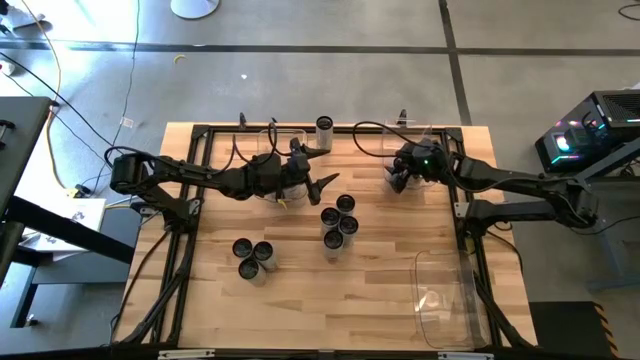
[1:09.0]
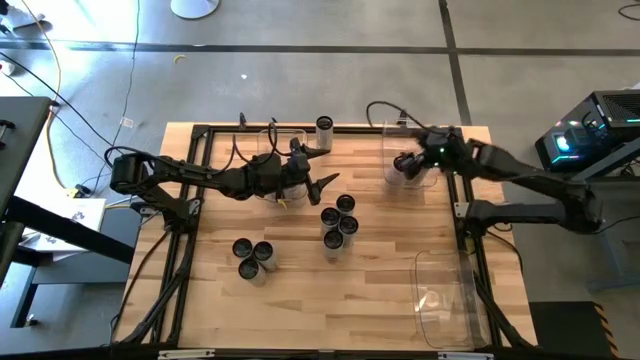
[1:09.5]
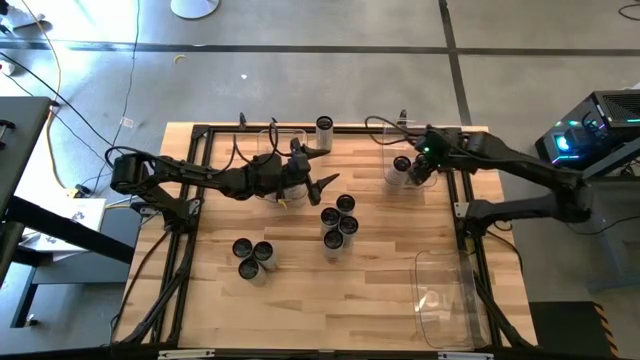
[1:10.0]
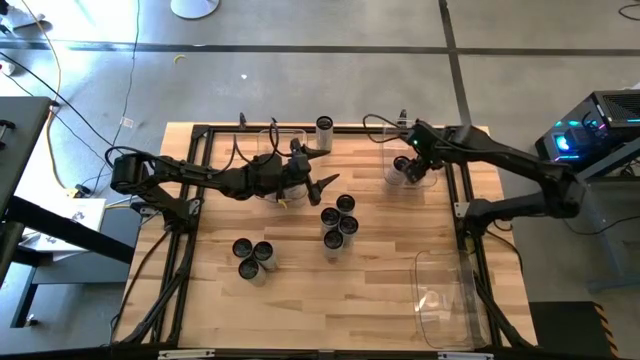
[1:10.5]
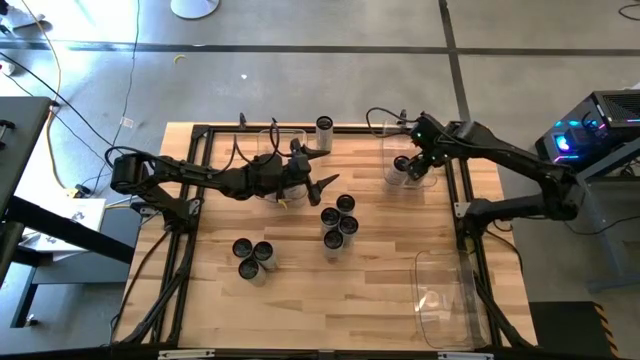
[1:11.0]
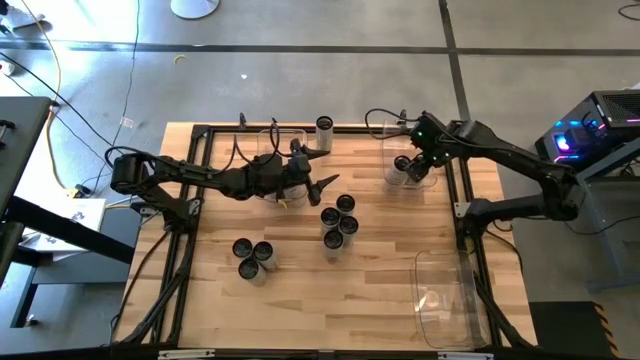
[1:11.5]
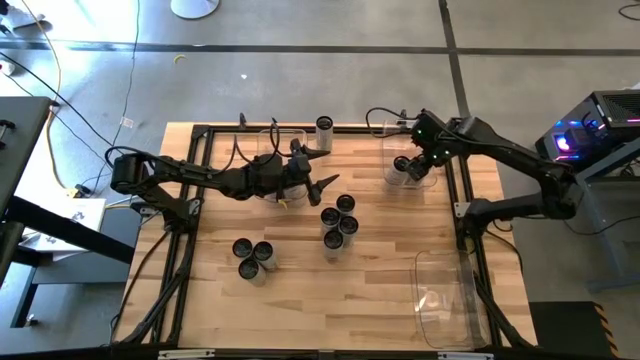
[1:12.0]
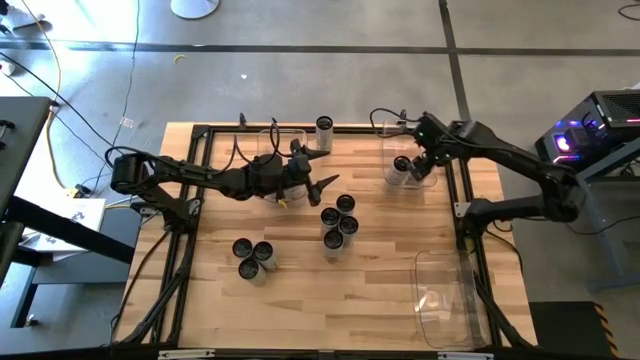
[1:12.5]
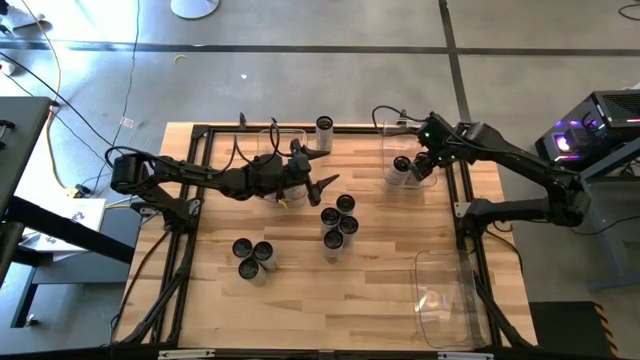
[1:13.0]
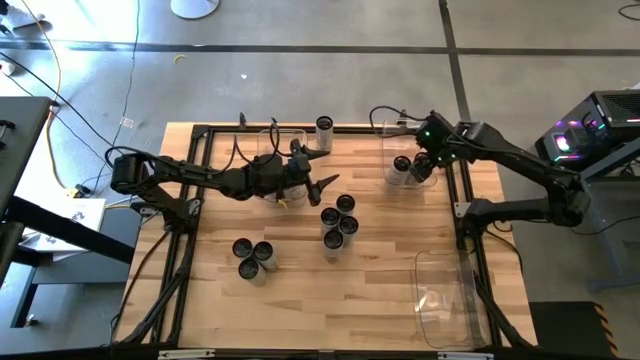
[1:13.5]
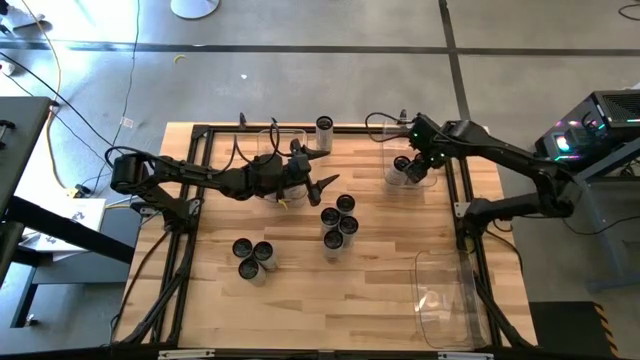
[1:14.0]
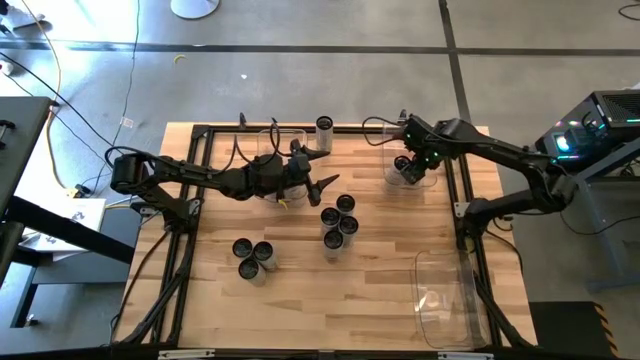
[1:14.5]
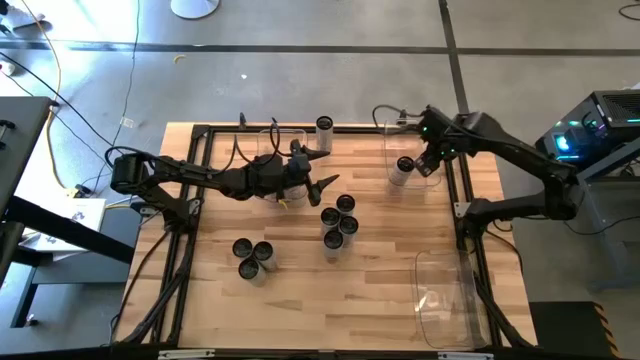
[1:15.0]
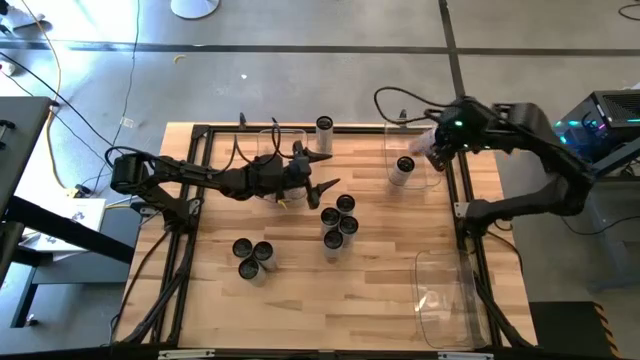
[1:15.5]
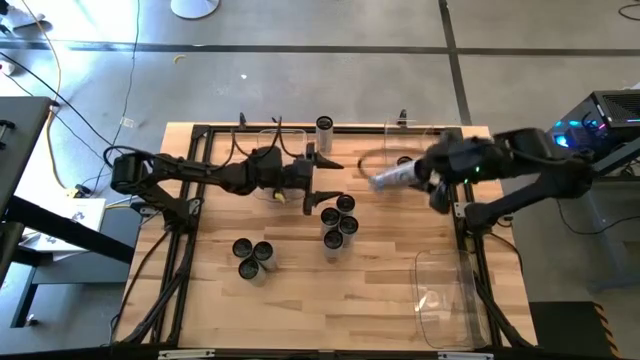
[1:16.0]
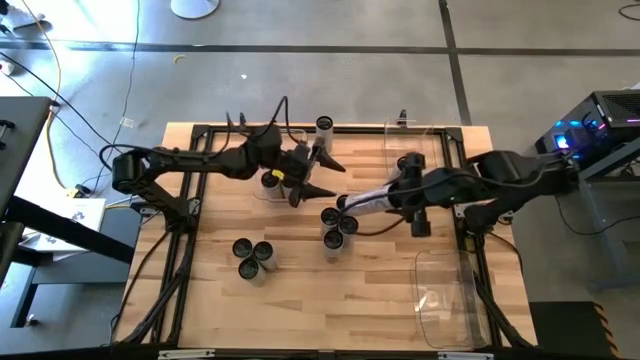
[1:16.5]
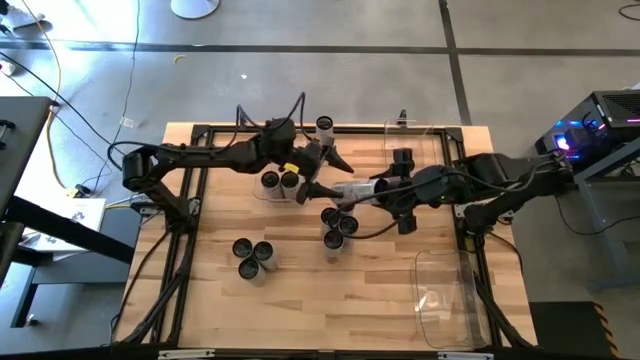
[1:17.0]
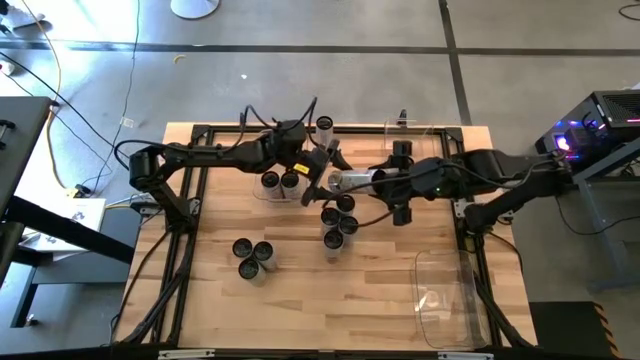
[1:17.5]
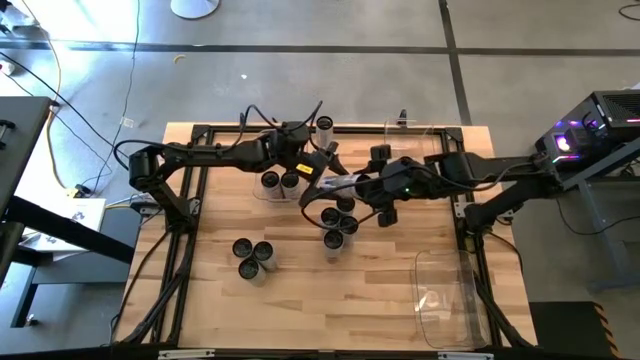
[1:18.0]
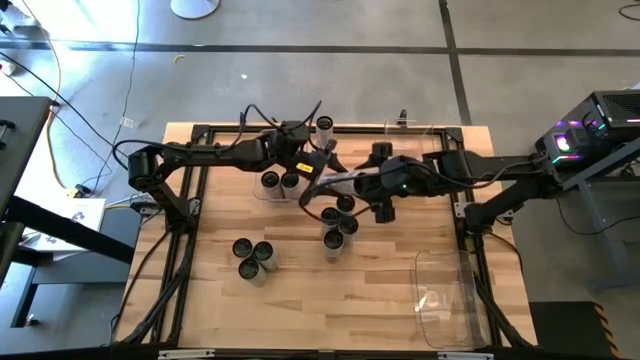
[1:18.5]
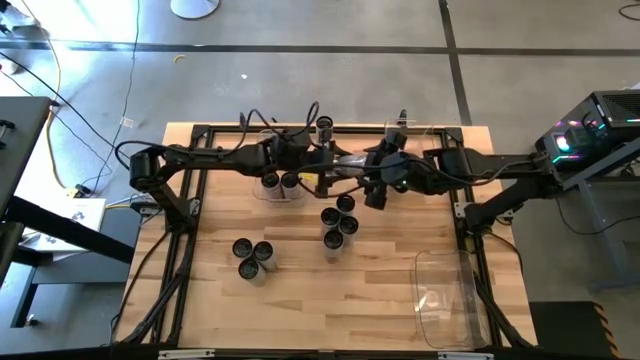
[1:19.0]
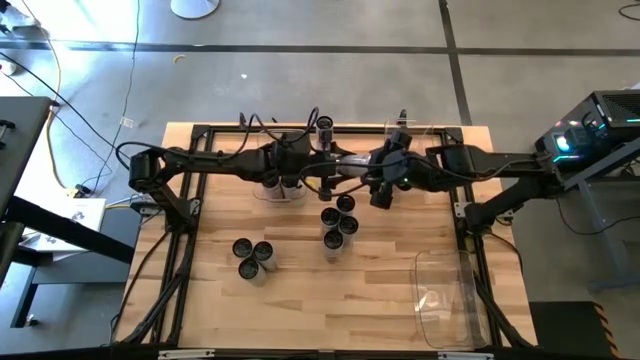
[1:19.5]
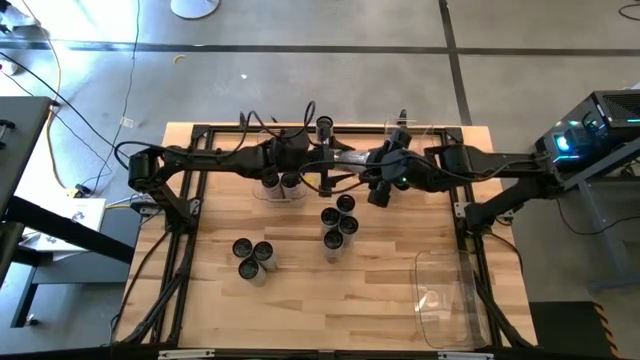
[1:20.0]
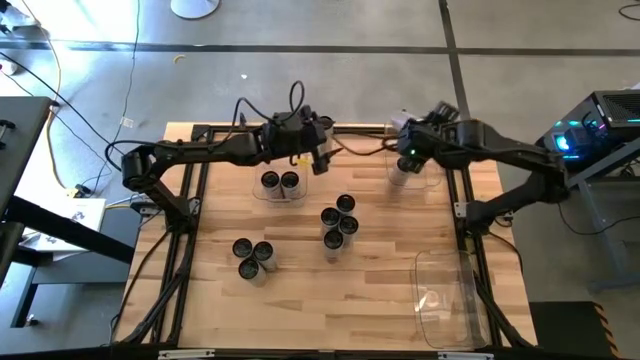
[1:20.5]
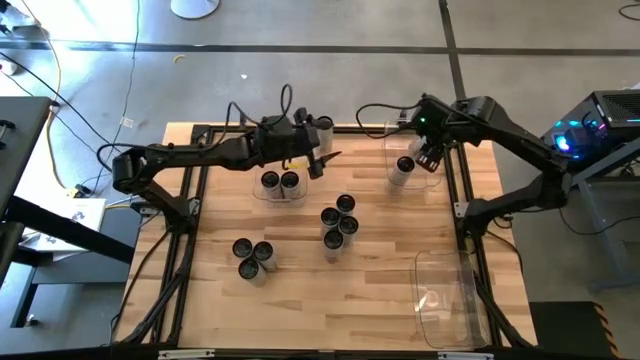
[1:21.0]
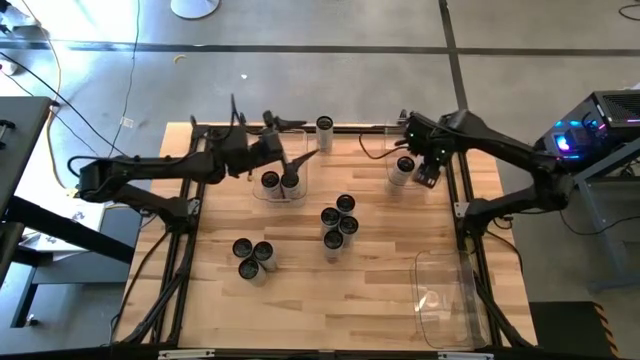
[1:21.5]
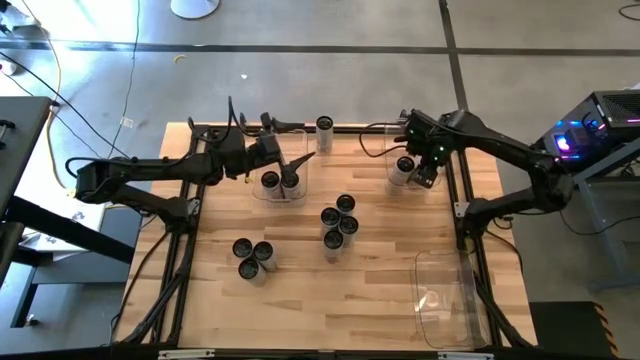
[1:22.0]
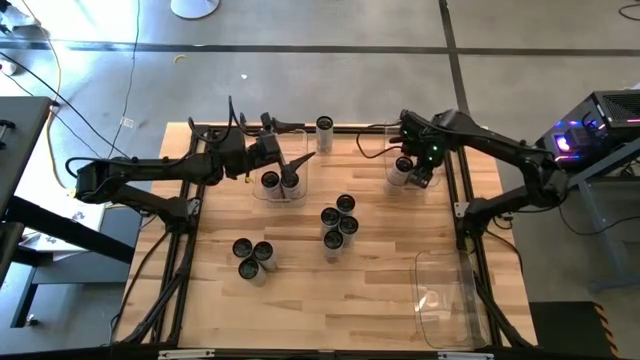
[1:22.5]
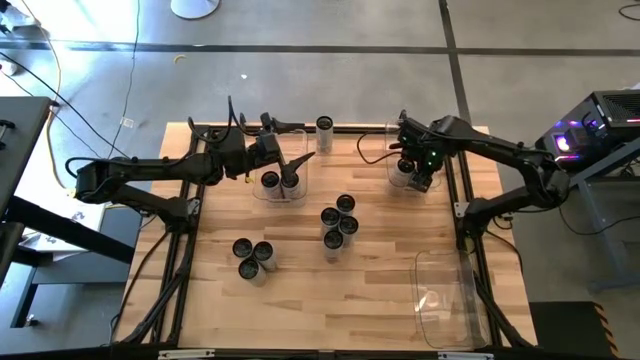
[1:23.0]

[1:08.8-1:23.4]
Task: Sort soda cans
Place the white-yellow soda can into the top right transparent bin

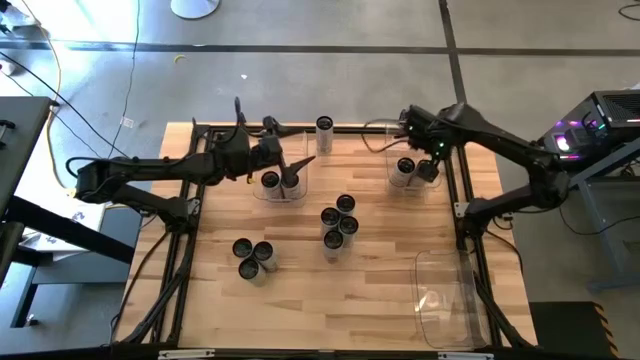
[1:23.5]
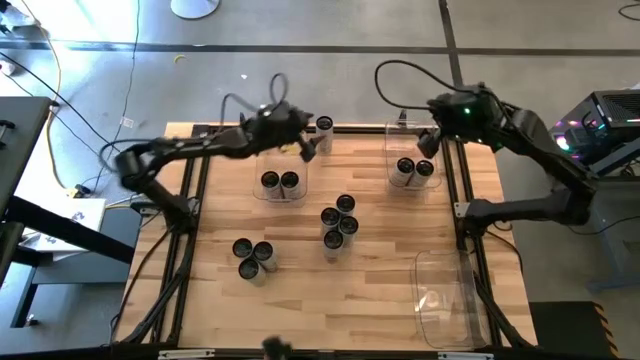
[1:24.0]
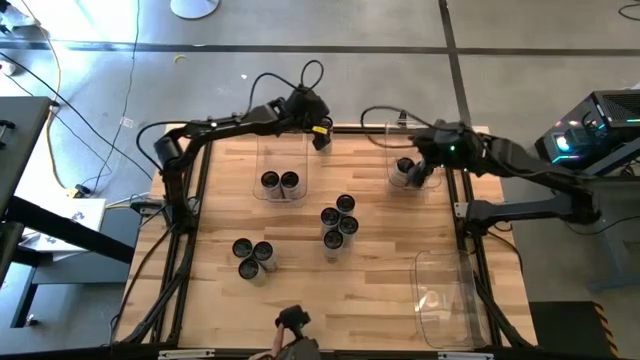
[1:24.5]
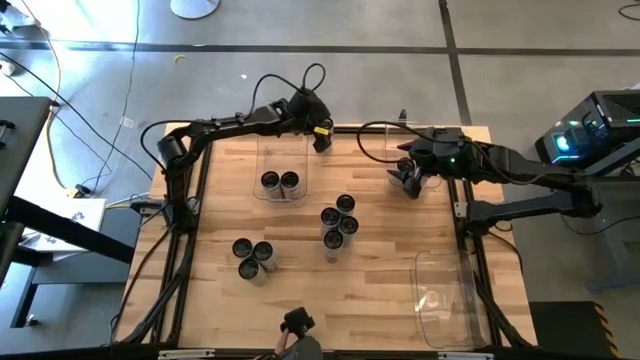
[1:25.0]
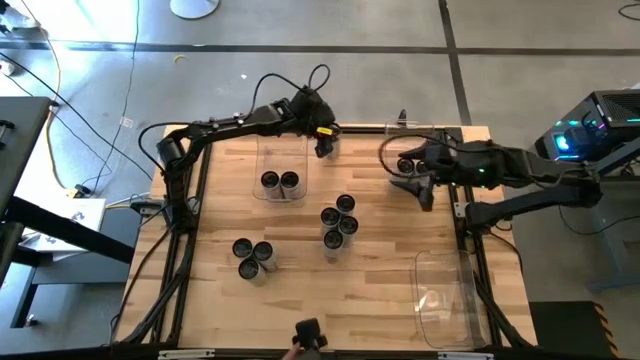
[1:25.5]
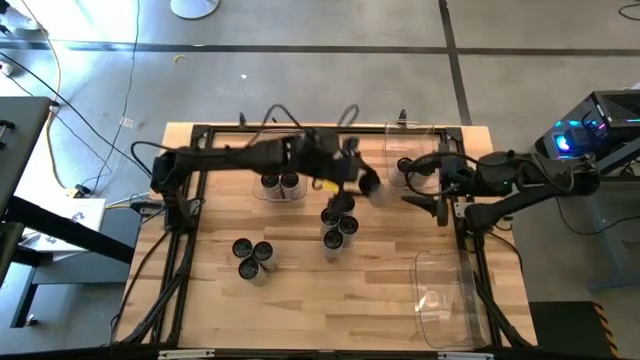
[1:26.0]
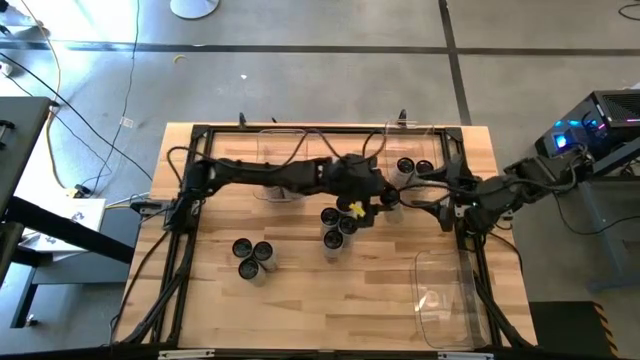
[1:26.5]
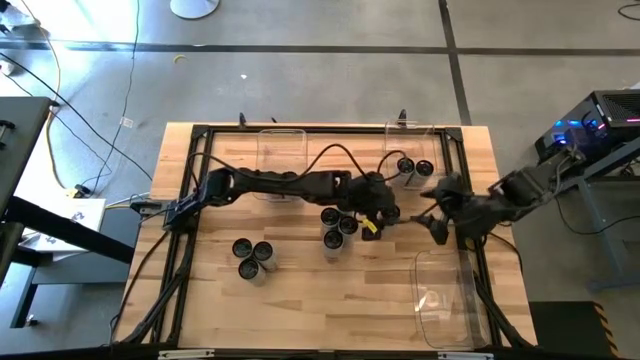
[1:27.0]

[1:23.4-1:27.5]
Put the white-yellow soda can into the top right transparent bin

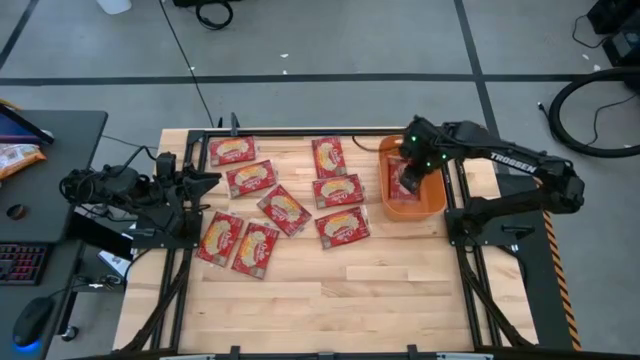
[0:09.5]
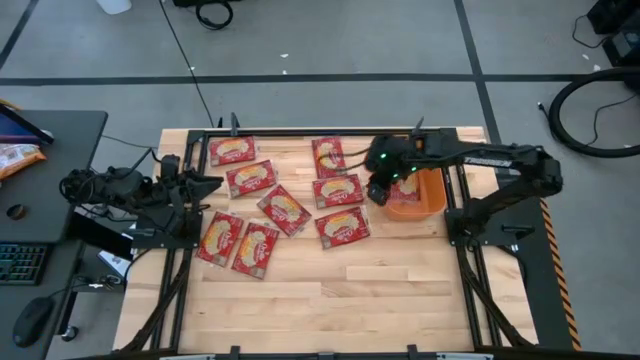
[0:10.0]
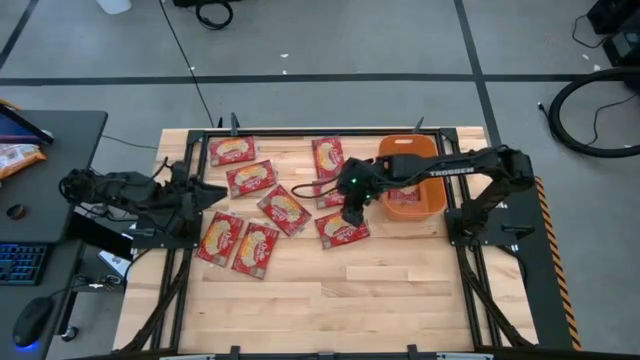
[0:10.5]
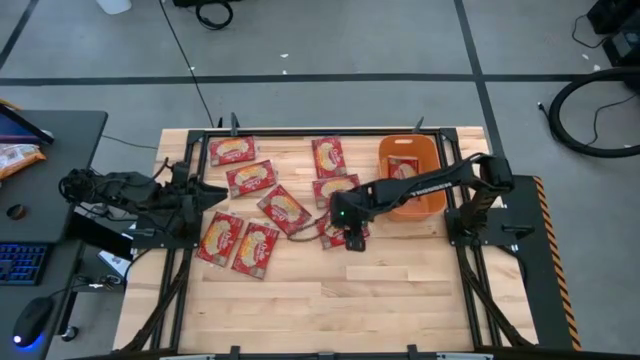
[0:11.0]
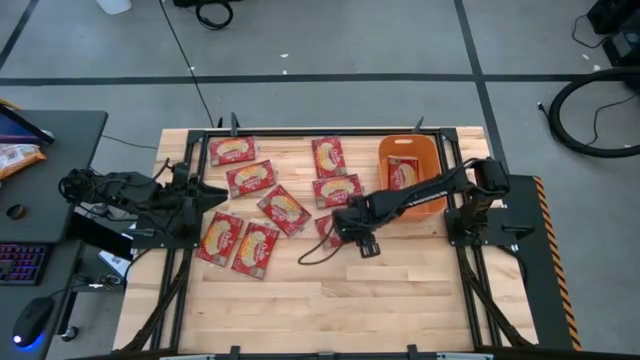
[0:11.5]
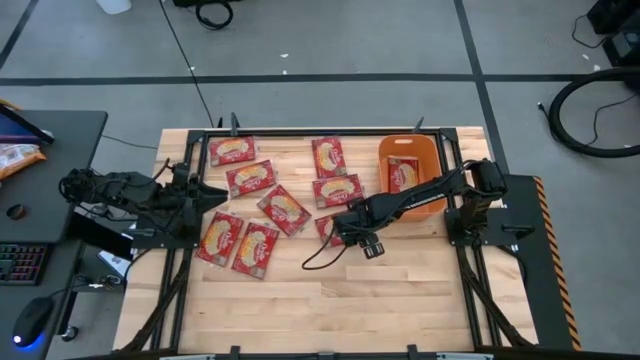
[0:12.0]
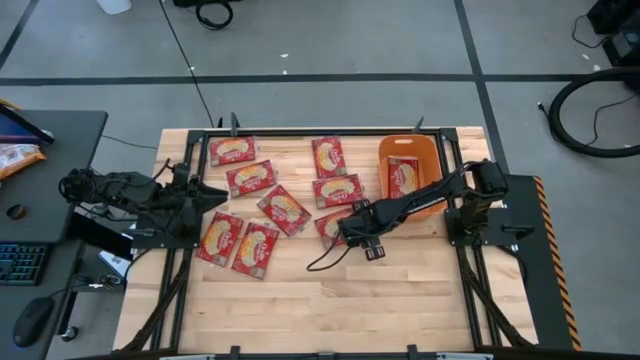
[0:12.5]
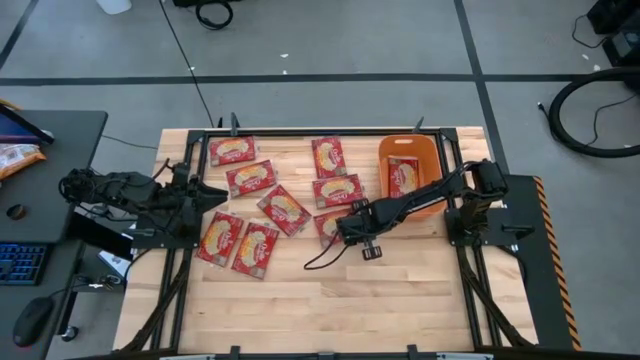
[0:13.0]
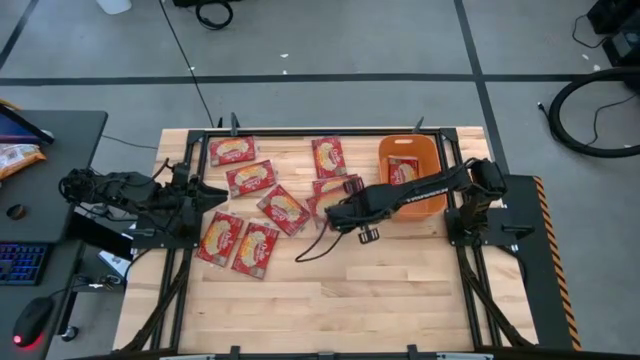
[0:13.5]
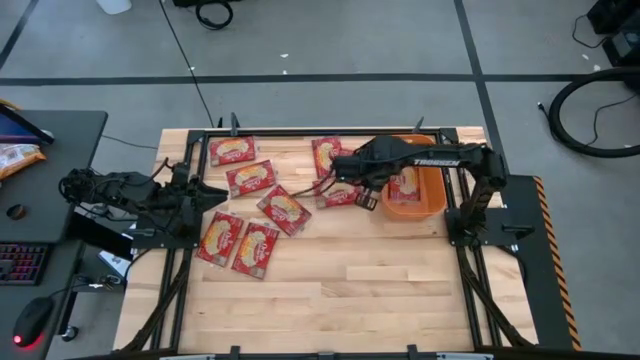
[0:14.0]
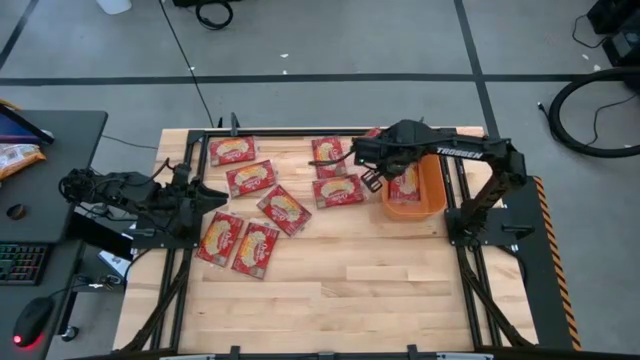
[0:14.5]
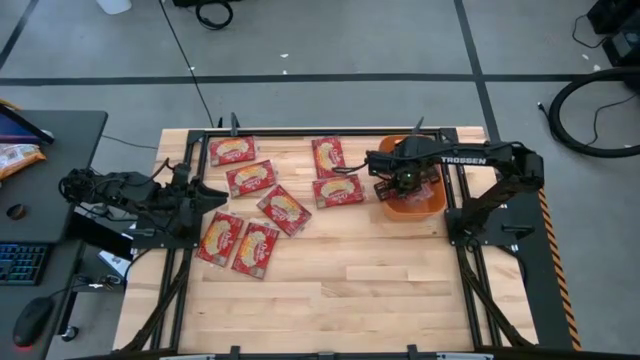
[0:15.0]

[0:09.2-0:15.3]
Task: Sort popcorn bags into baskets
Put the red popcorn bag into the orange bin
